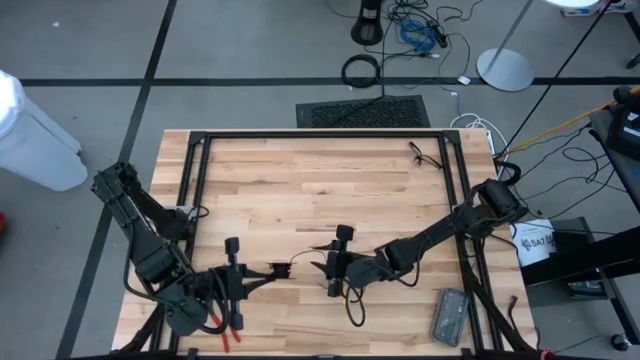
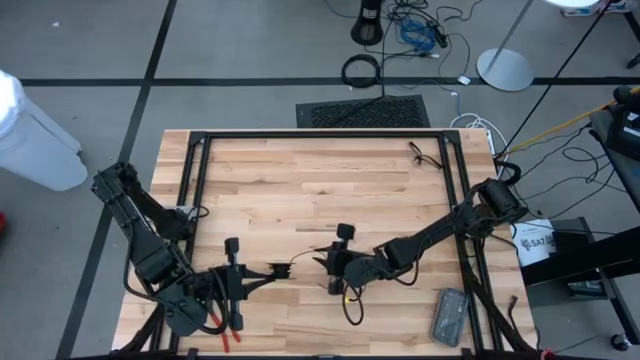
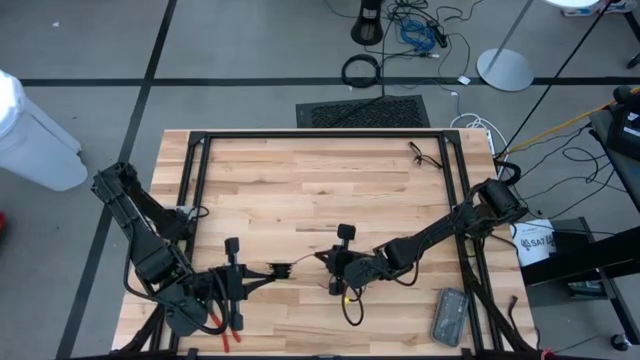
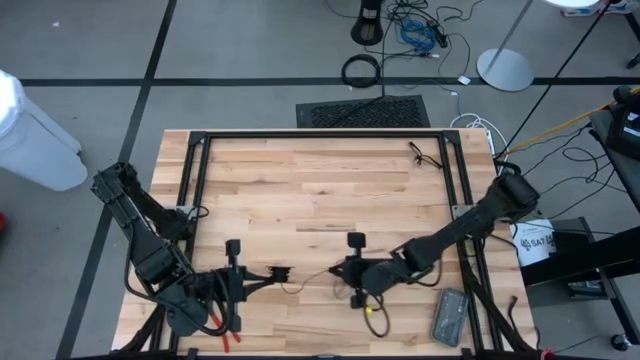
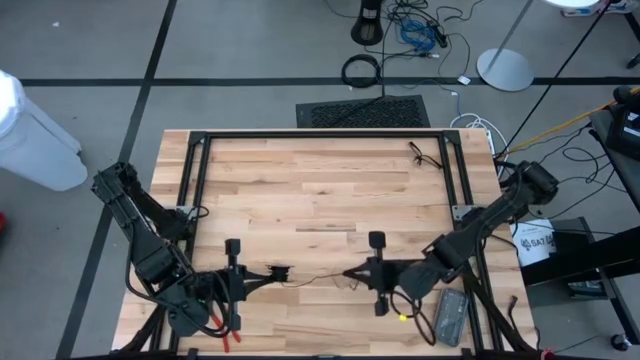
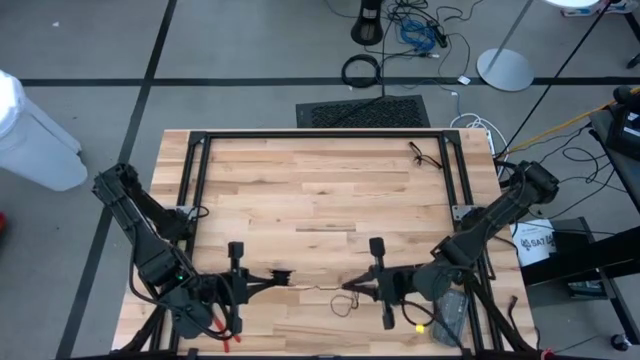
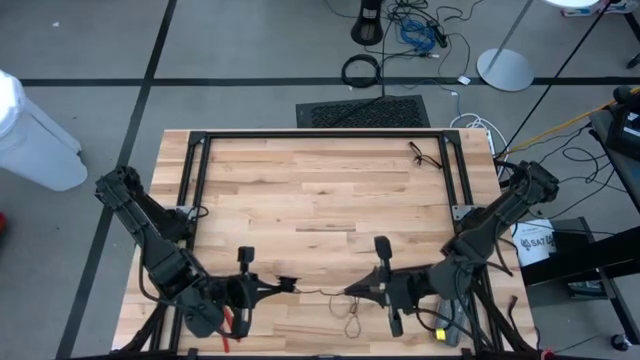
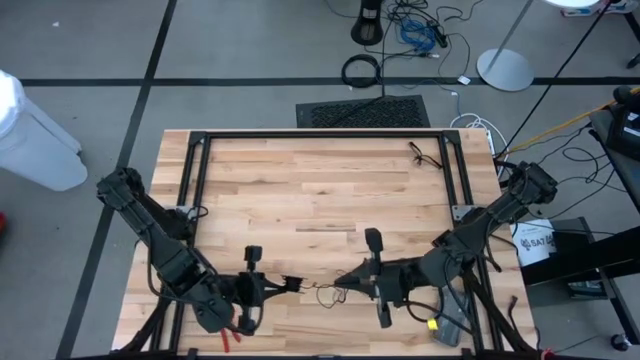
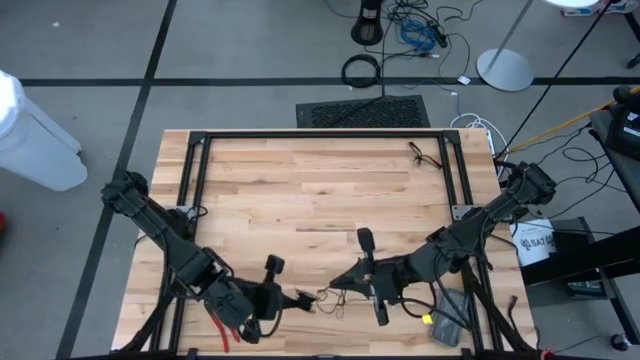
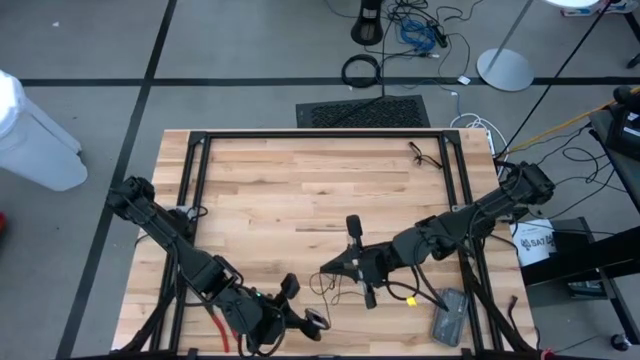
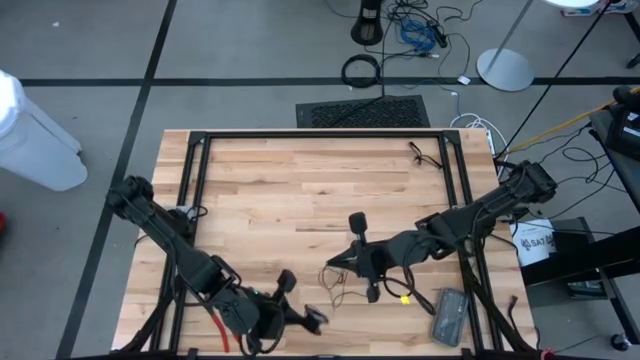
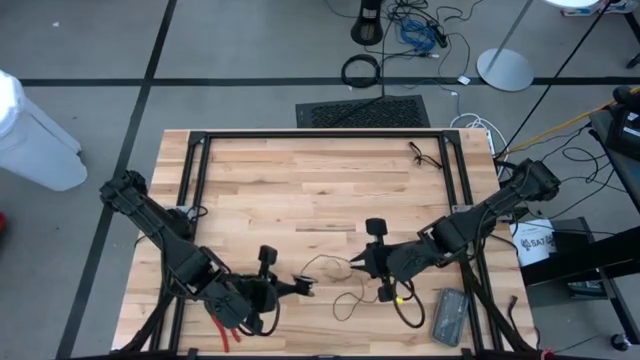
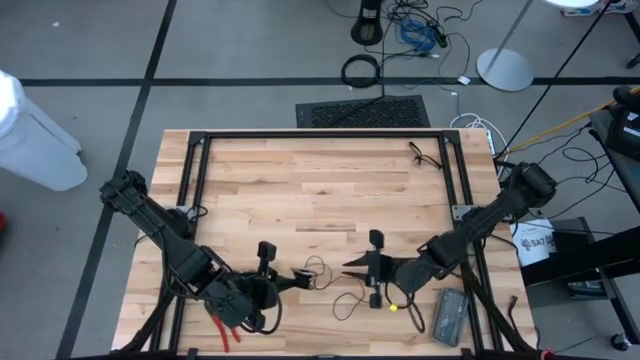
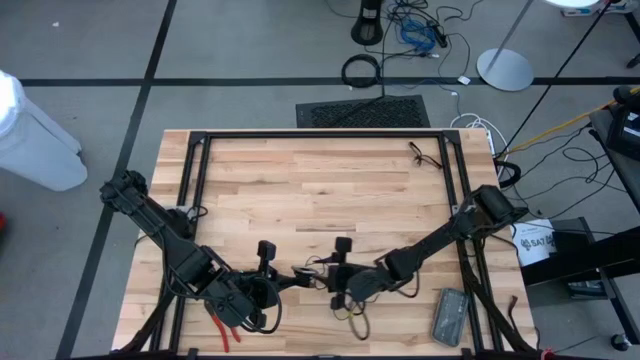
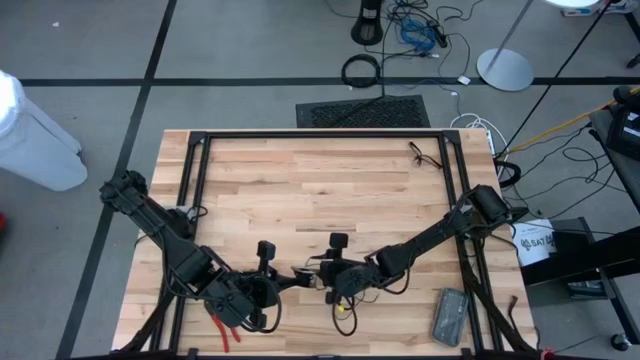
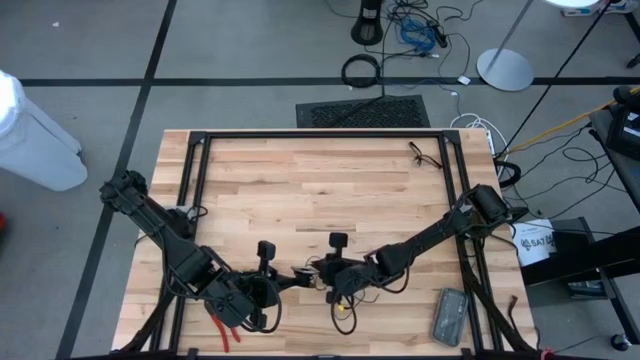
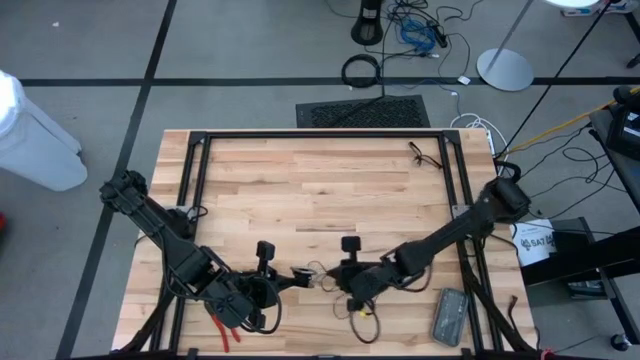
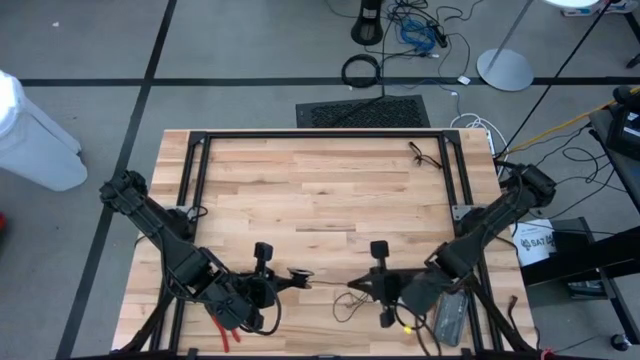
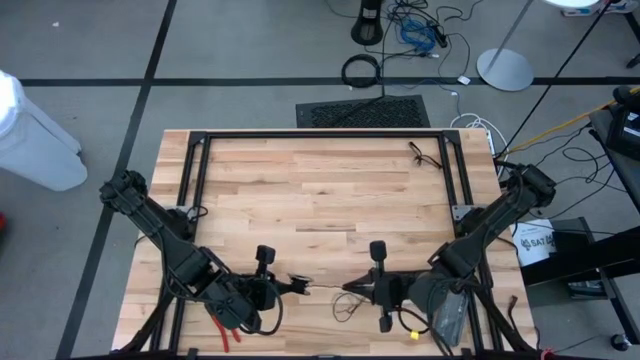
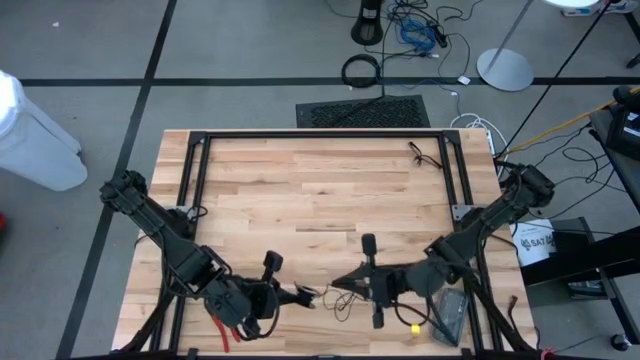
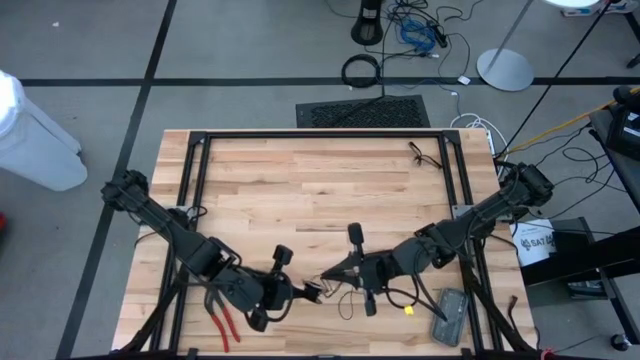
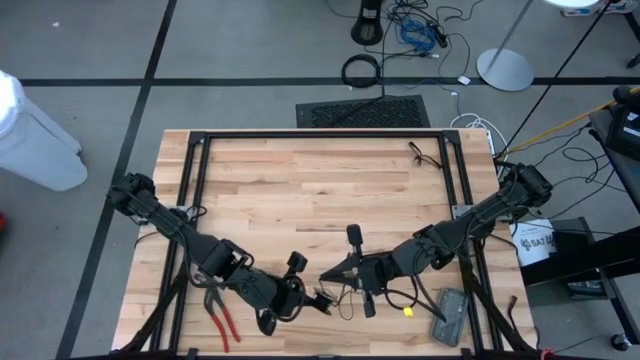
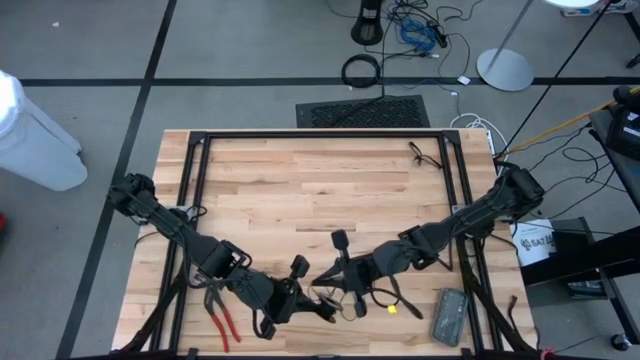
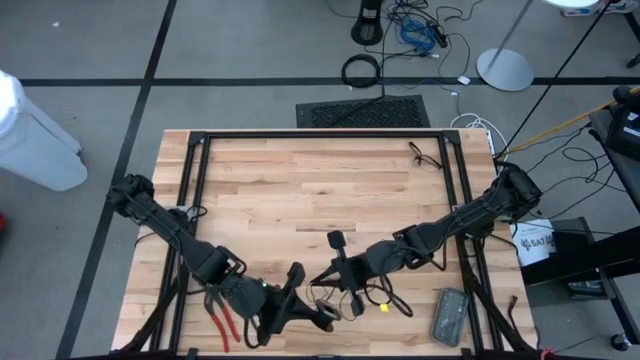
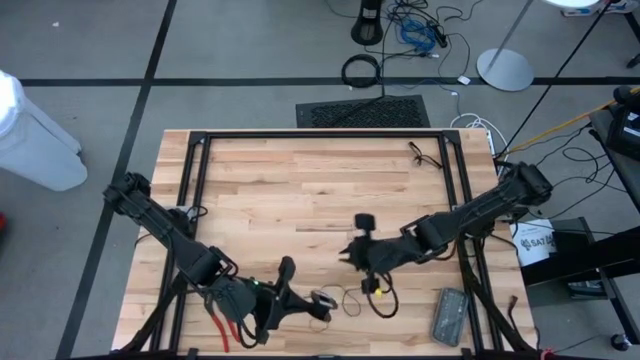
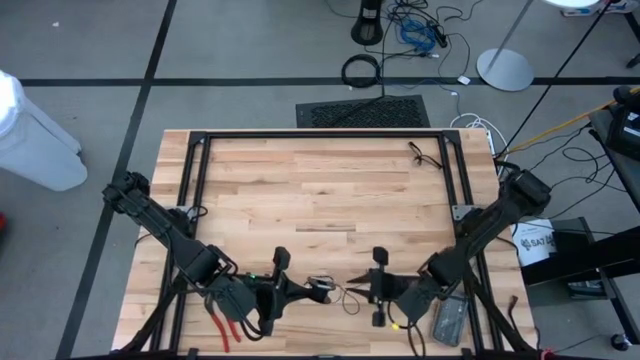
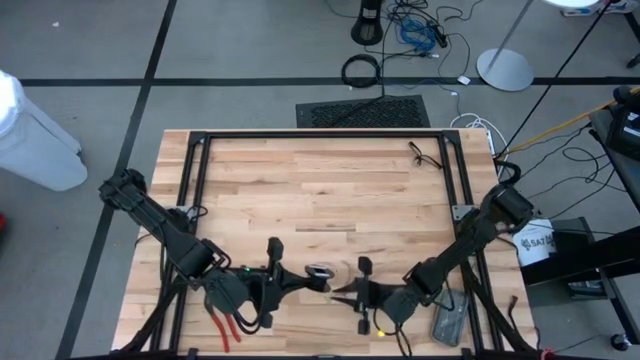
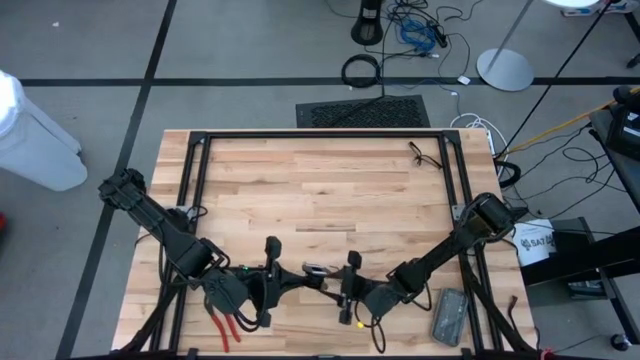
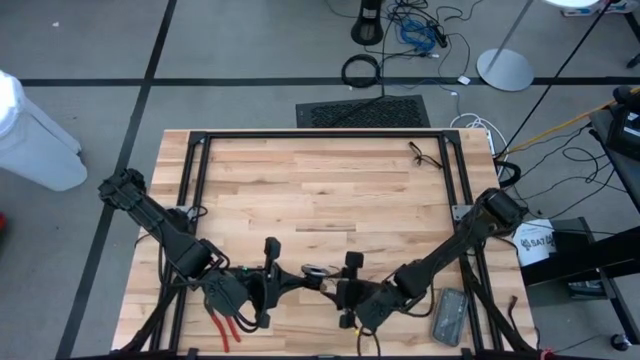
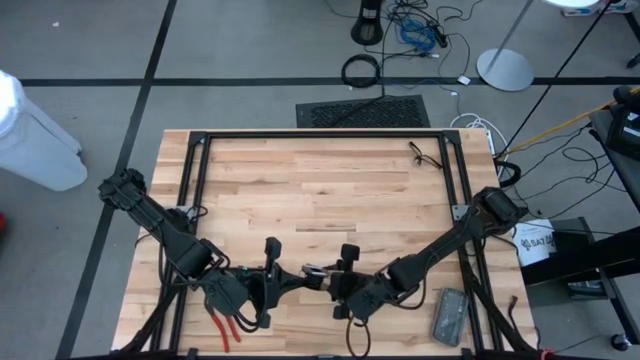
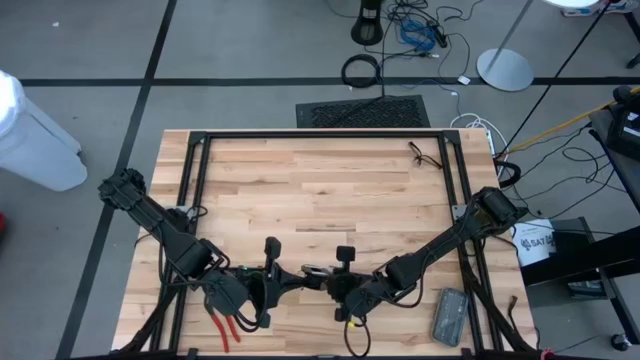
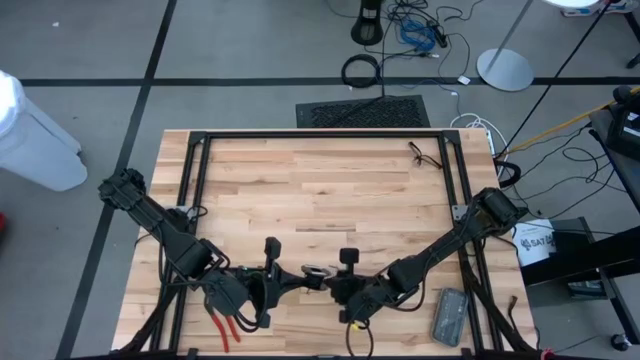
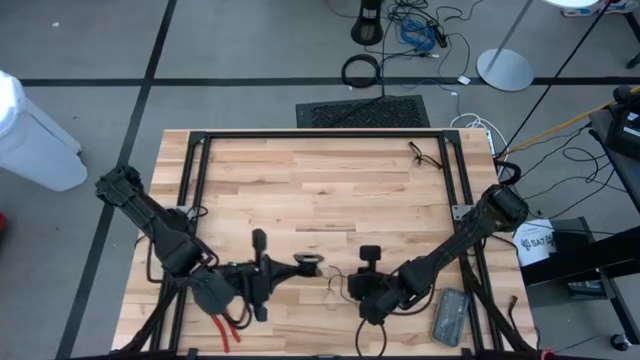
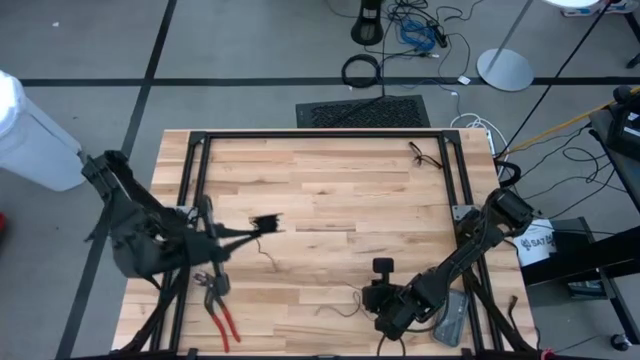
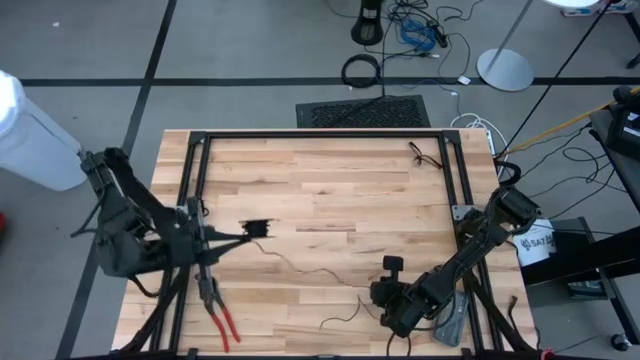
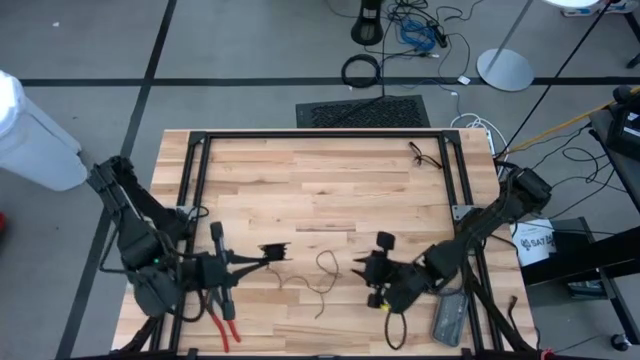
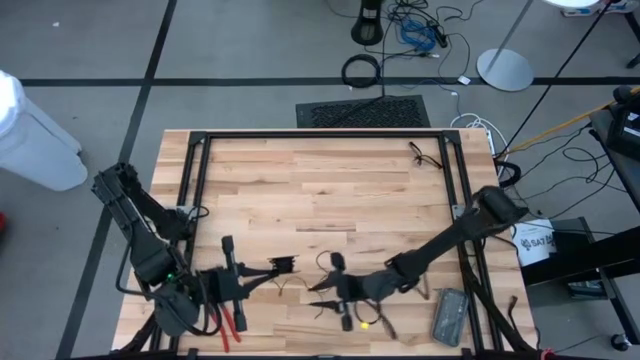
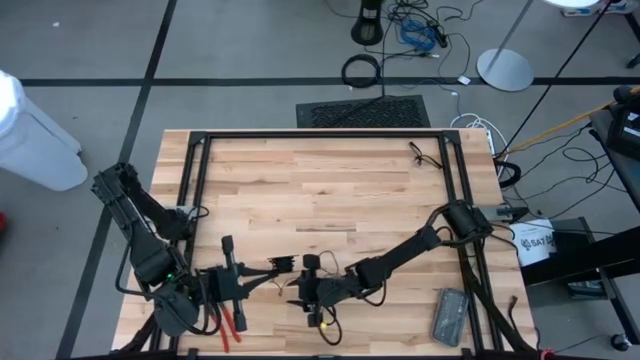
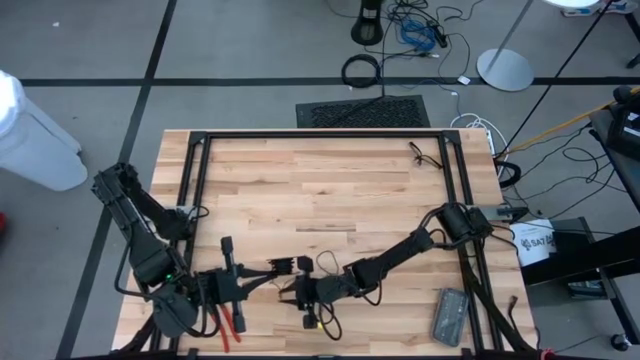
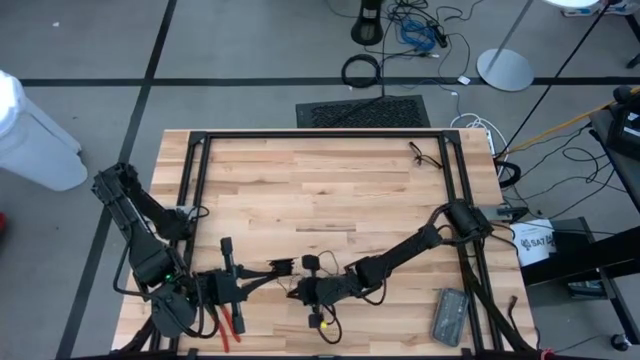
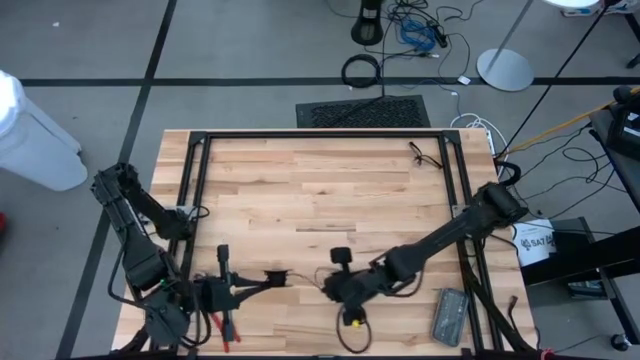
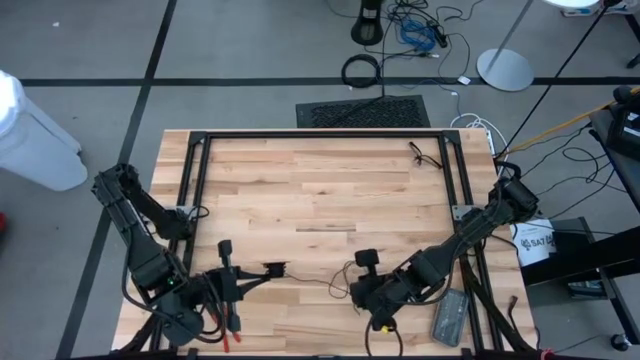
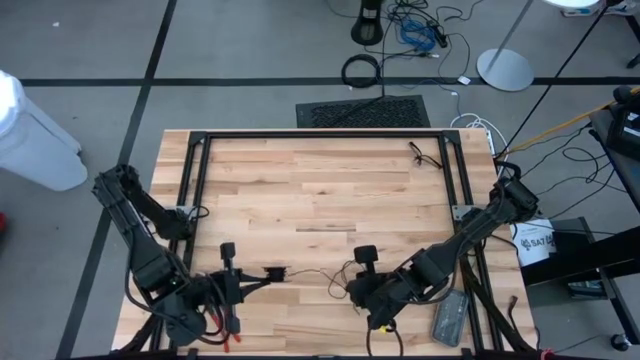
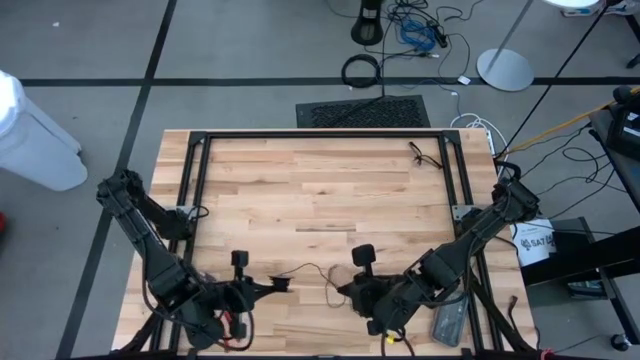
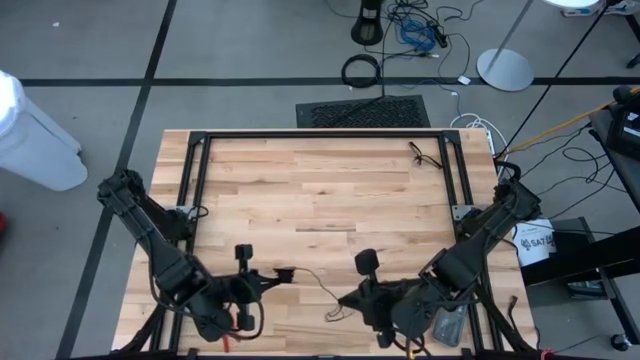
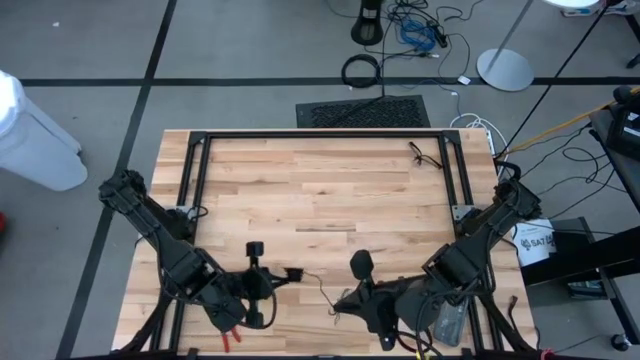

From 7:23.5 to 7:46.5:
Task: Coil cords
Coil the black wire onto the black spool
